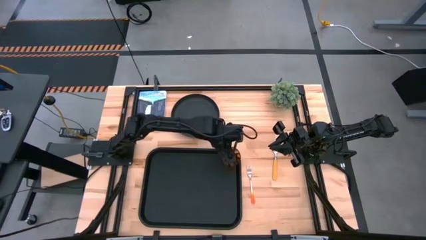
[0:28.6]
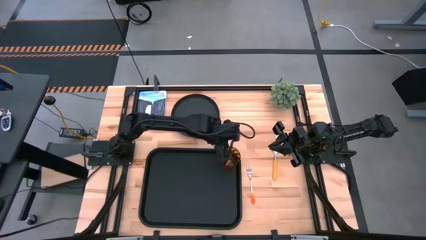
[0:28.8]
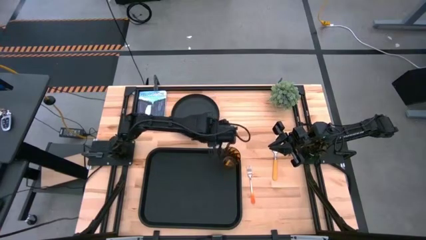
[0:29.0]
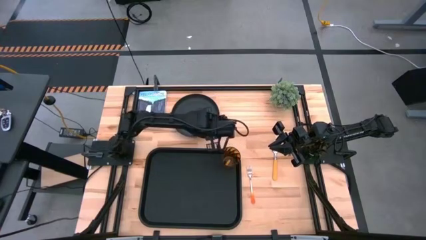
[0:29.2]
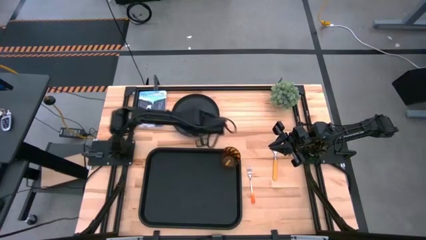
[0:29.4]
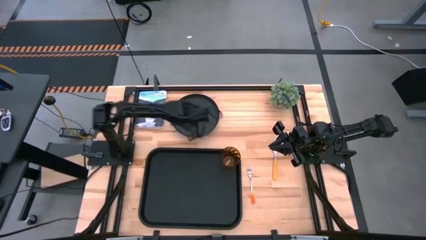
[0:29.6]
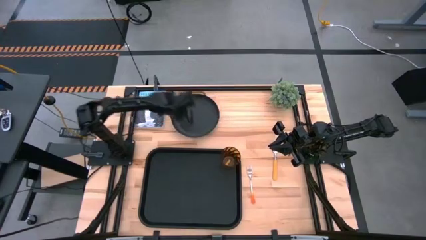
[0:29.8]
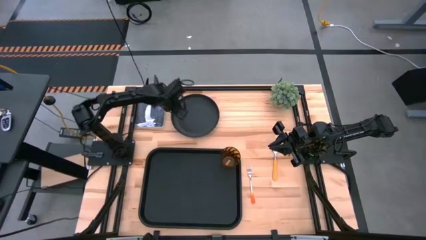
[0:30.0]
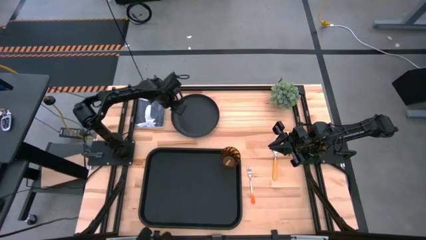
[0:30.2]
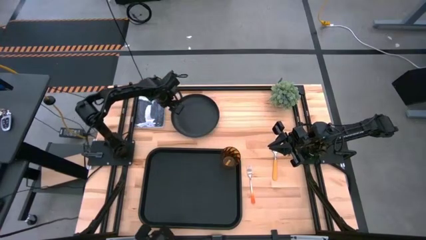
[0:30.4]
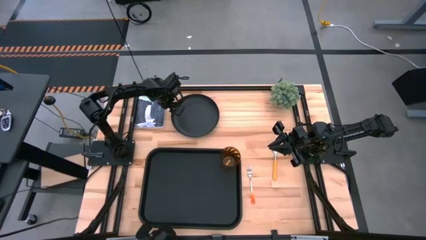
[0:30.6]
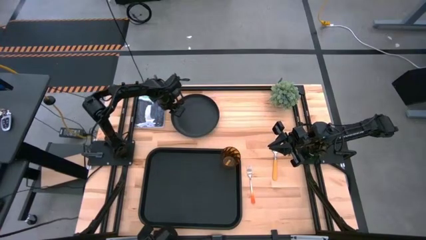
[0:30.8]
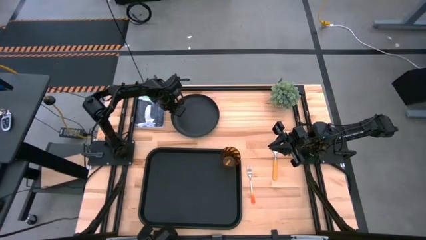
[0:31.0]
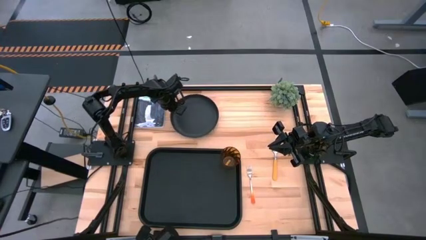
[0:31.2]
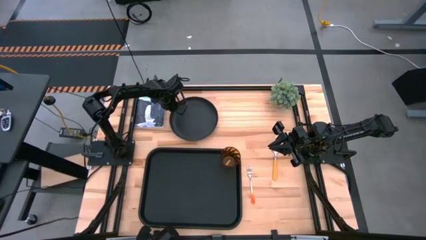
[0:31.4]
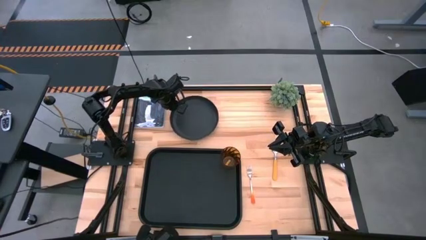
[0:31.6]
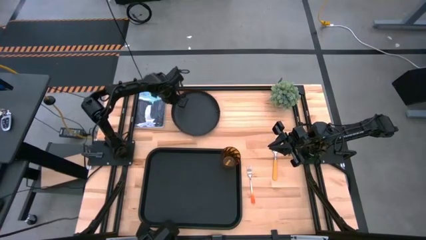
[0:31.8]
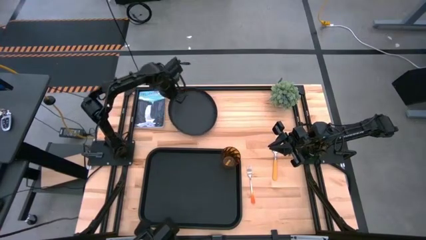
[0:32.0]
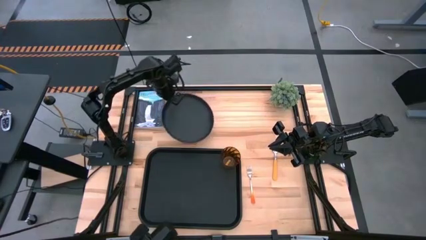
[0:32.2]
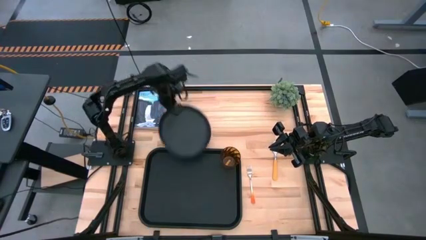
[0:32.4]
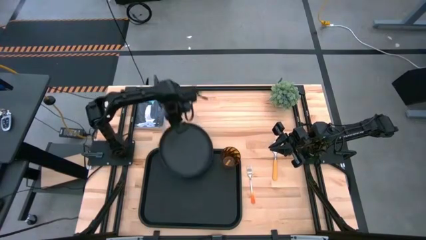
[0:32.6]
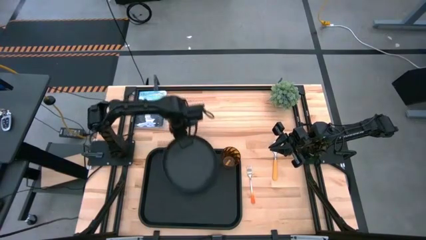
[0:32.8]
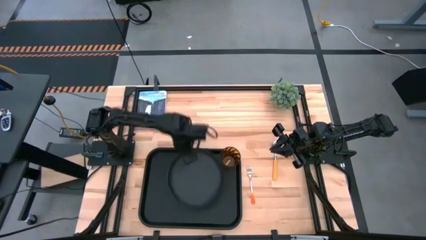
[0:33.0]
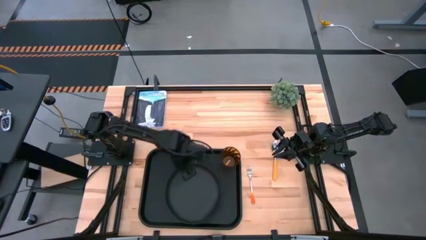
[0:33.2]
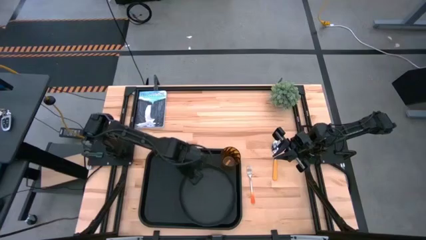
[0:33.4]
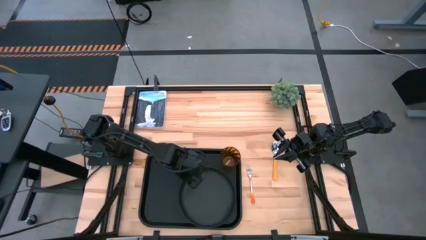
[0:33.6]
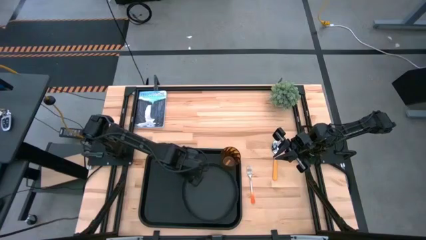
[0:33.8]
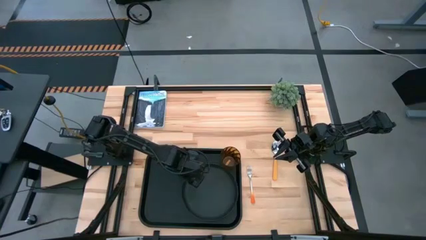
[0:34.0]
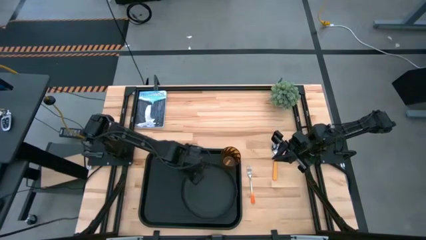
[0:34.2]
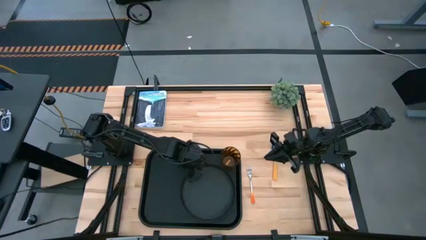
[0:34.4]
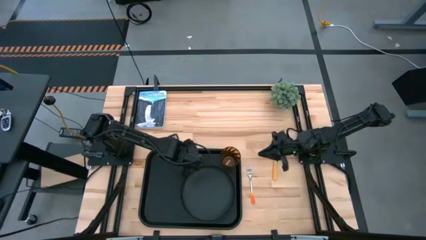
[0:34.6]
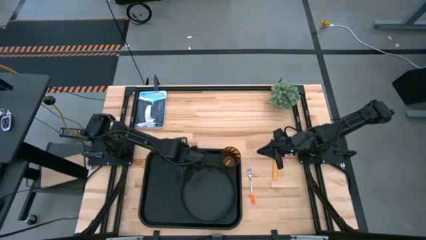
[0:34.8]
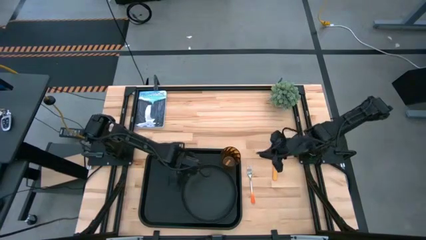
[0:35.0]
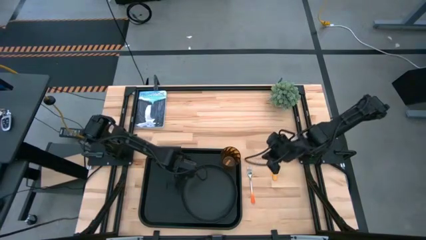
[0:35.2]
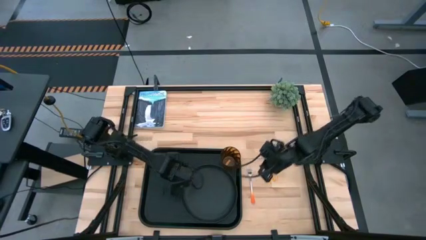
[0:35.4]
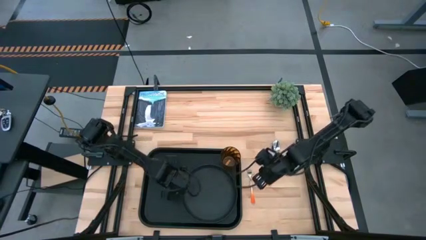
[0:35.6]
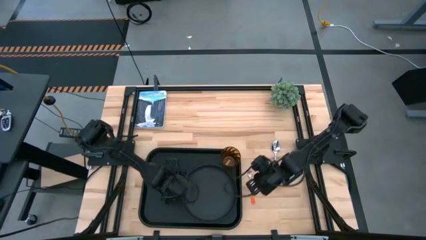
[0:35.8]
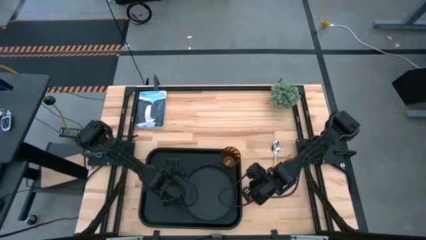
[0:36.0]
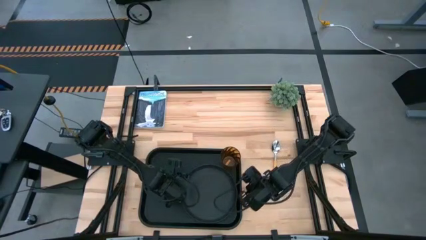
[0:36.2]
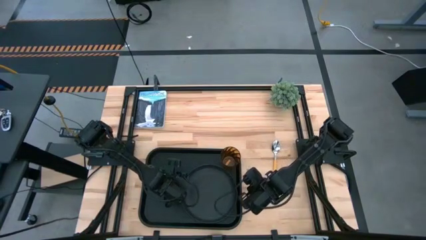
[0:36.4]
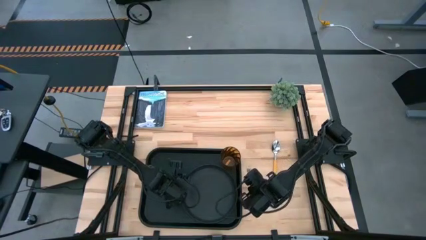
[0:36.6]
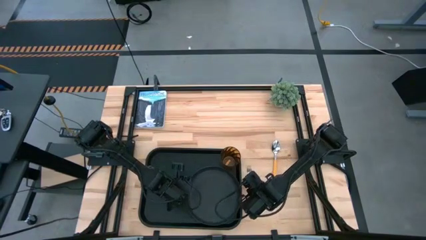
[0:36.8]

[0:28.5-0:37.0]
Task: Pick and place plate/cup/fork/spoon on tray
Put the black plate under the orange glass on the black tray

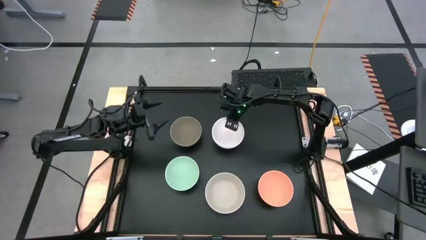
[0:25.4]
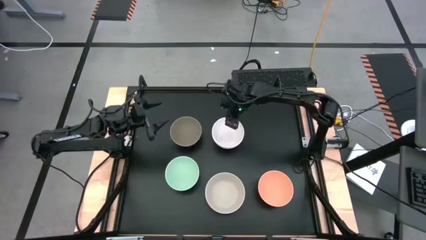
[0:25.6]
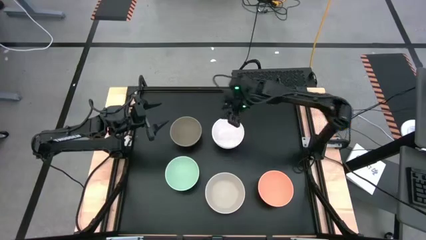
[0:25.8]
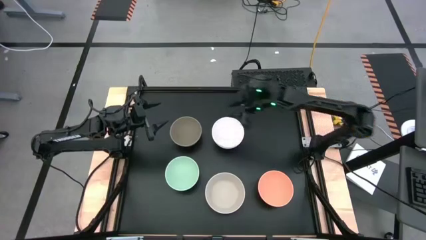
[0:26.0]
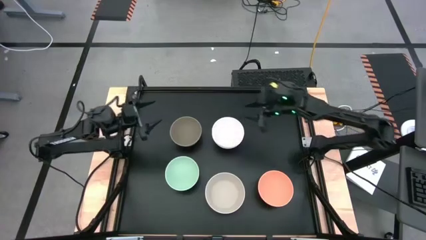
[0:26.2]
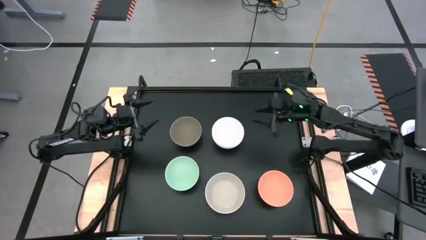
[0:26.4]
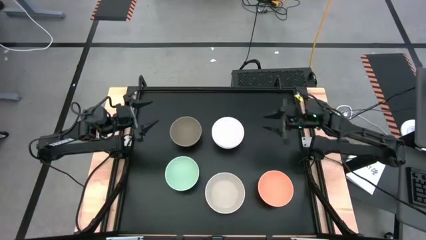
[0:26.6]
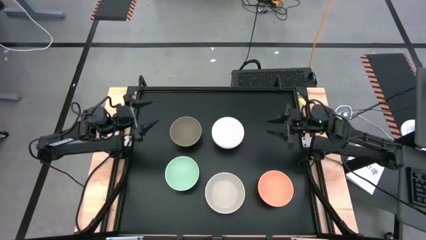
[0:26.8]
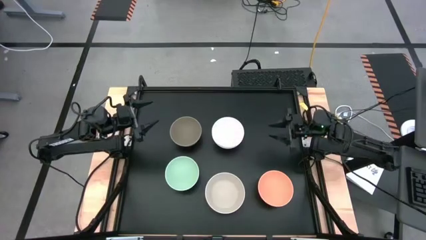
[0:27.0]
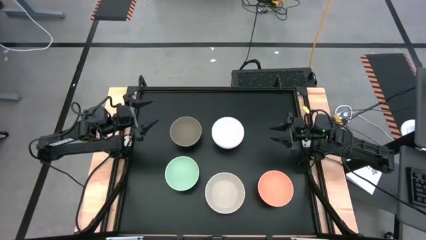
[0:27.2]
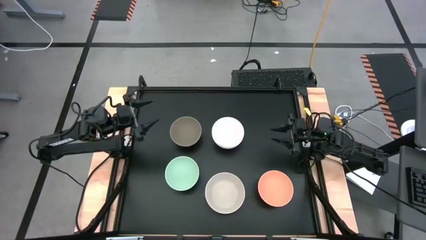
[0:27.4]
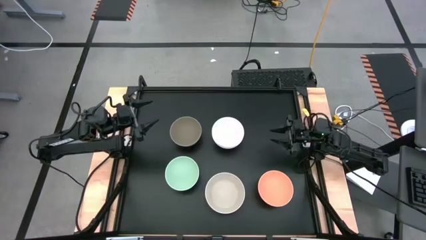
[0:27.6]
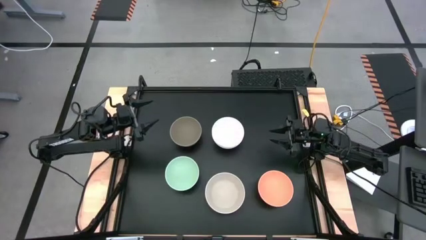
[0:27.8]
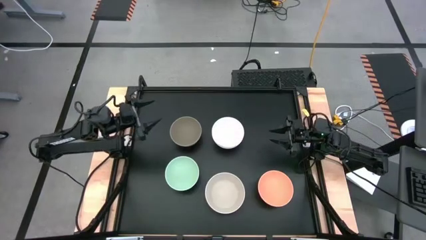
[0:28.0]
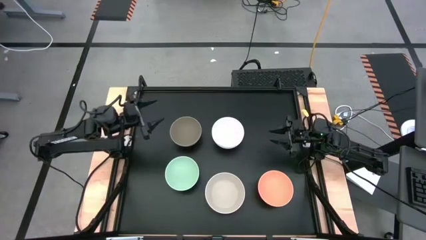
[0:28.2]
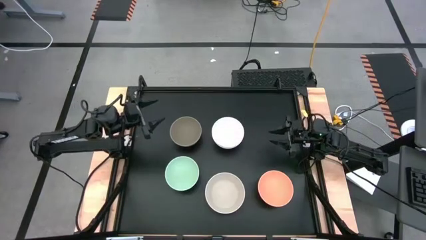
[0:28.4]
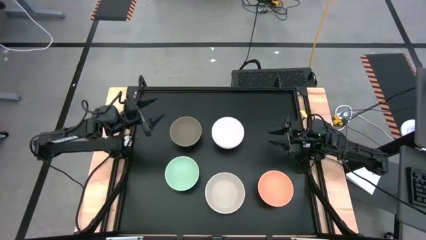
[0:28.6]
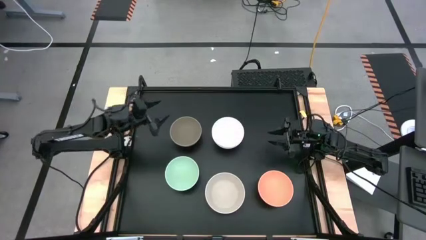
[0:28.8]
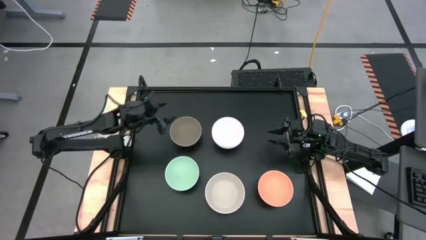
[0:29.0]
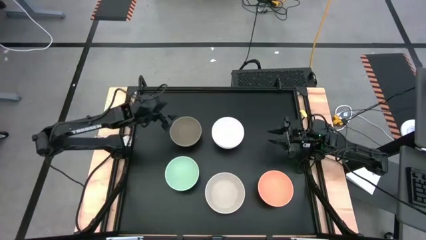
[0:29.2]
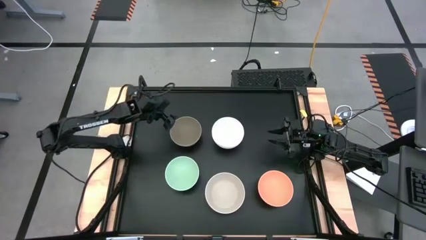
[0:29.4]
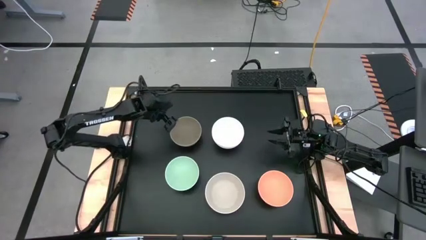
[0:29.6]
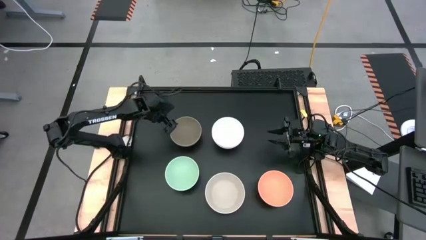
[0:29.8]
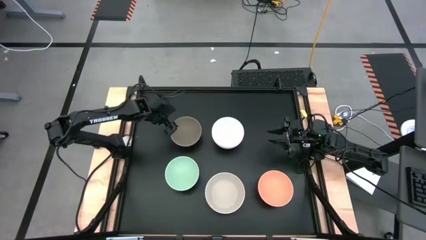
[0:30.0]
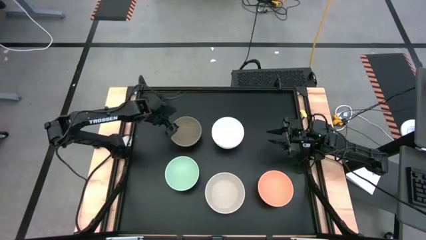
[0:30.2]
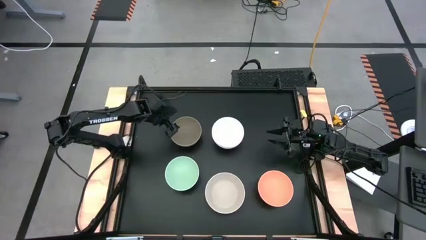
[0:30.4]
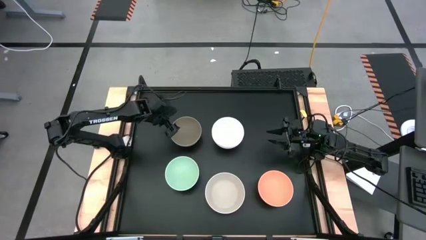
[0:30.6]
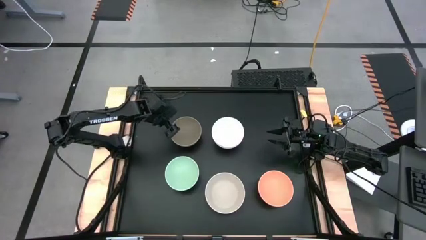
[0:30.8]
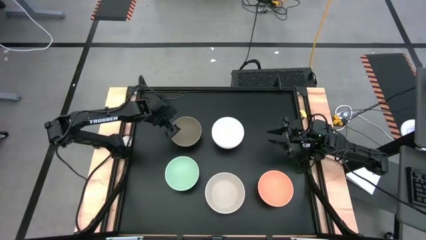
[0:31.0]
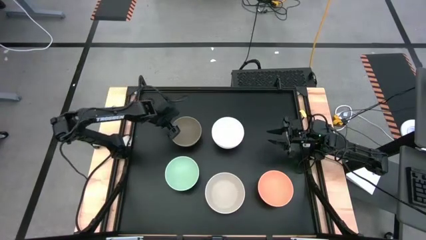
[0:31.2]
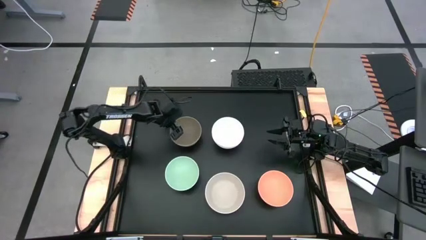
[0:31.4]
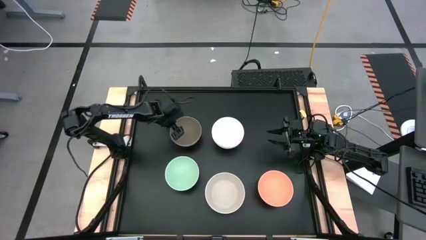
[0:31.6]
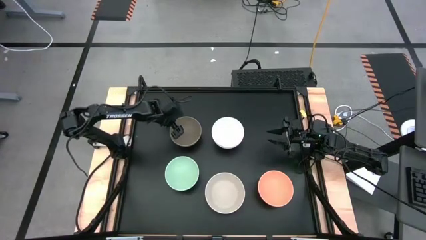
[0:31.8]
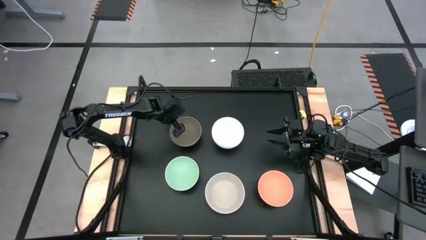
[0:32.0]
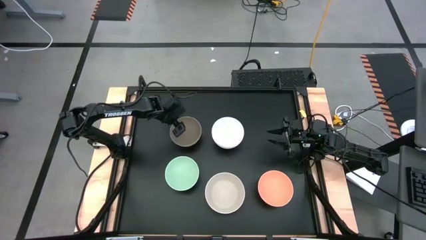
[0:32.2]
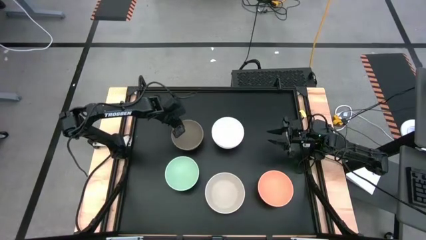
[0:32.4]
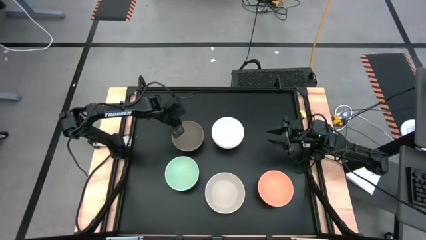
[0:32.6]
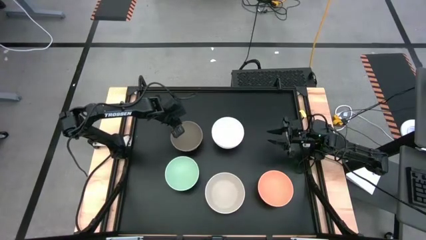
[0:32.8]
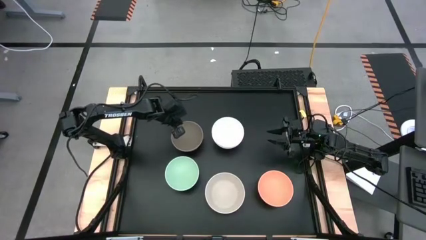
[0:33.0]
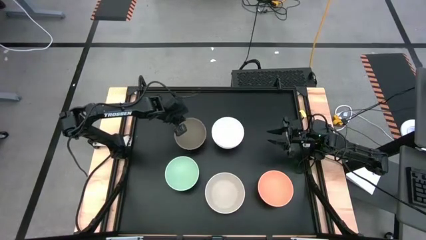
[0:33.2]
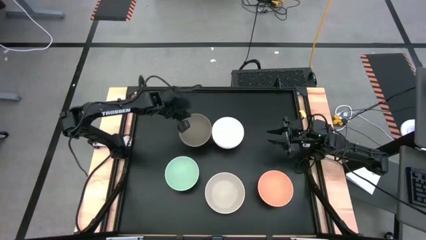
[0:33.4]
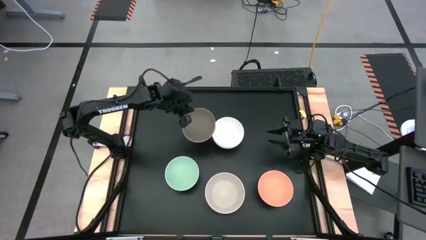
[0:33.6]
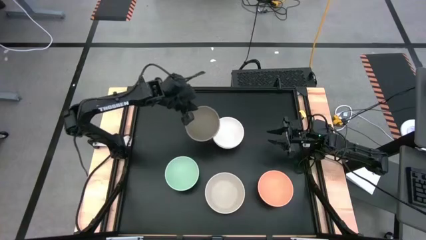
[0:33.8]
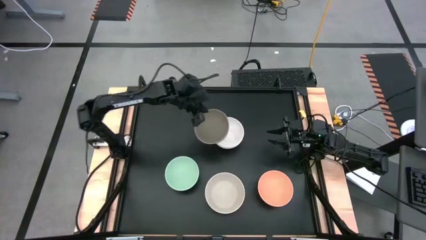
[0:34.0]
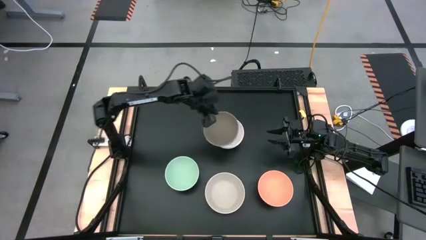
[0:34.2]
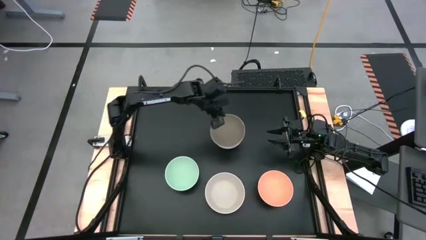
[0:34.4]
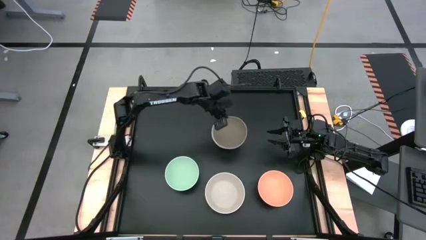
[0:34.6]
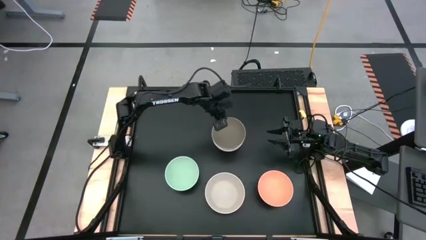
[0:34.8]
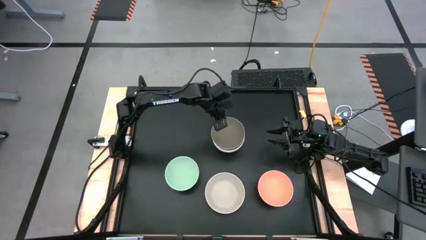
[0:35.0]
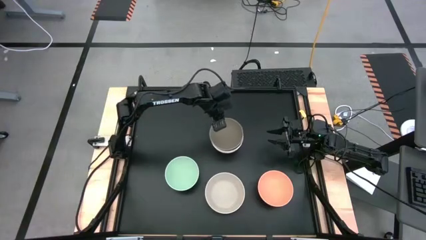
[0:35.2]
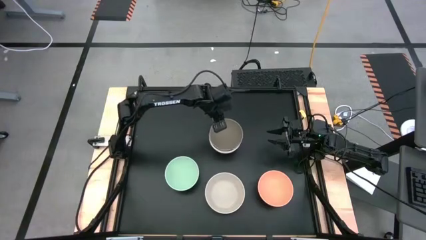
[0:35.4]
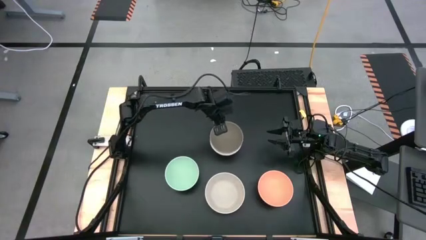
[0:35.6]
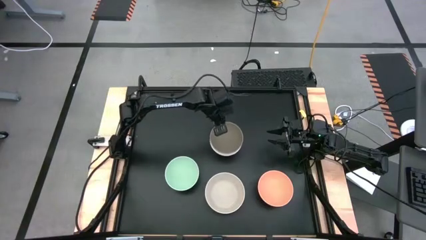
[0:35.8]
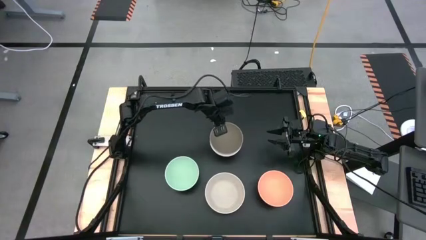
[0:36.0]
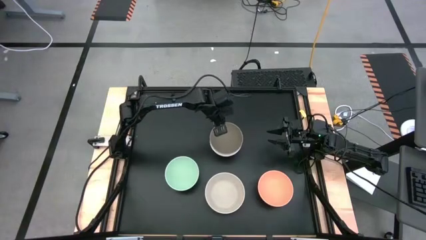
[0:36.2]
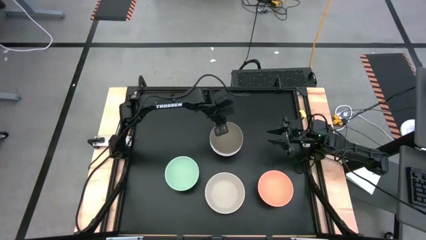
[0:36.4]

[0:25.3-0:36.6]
Task: Nest bowls inside each other
Stack the brown bowl on the stacked white bowl
